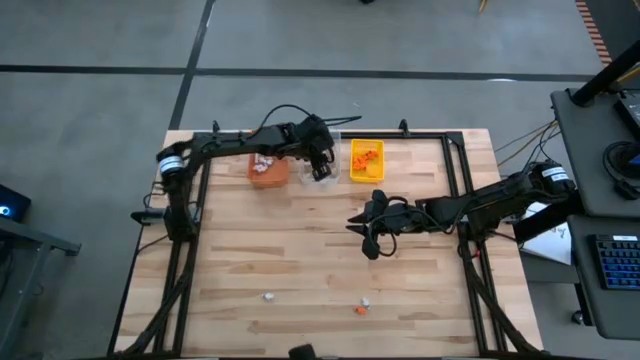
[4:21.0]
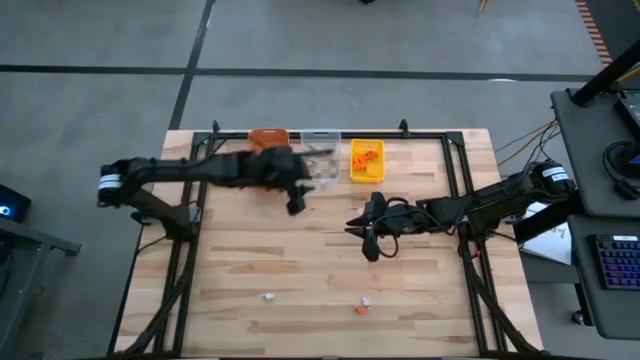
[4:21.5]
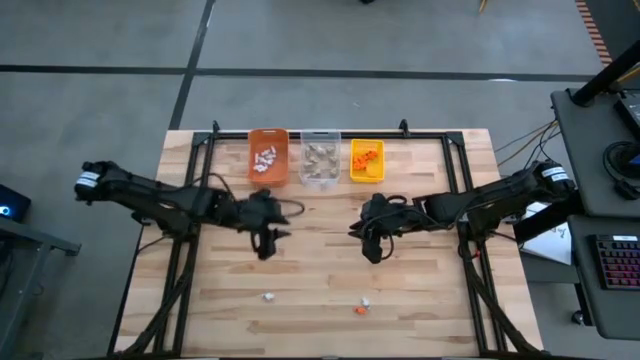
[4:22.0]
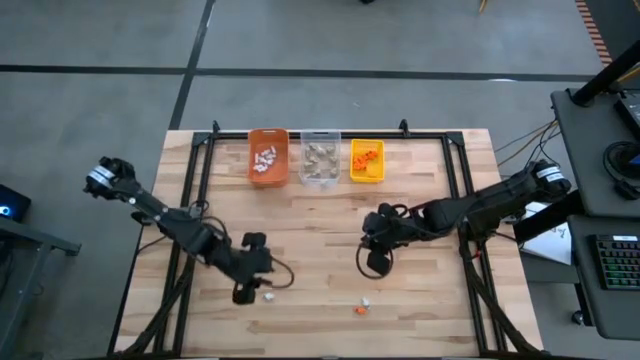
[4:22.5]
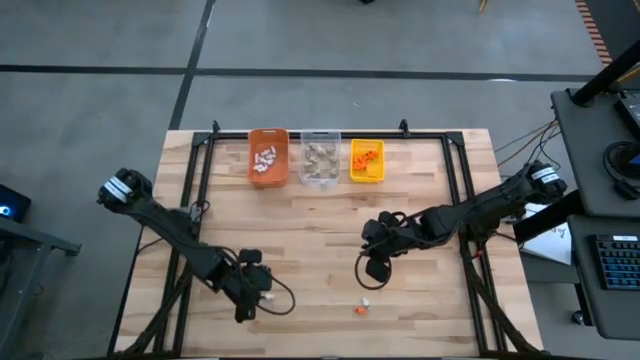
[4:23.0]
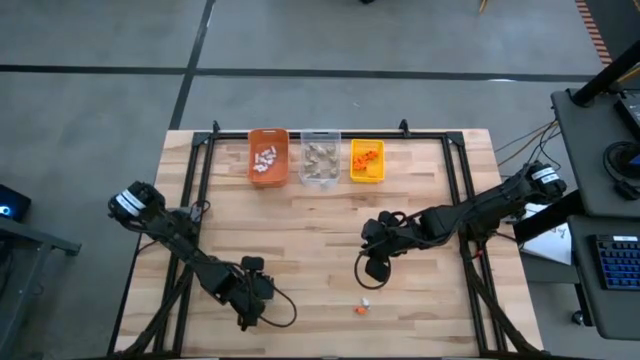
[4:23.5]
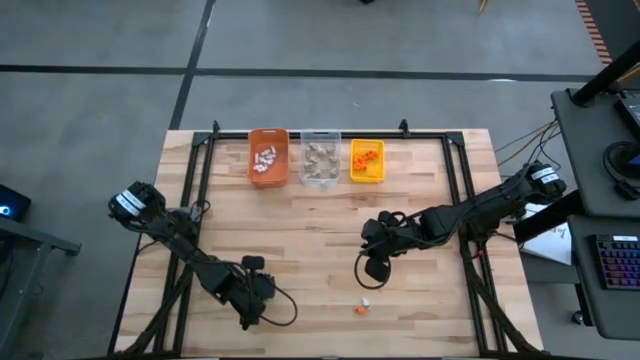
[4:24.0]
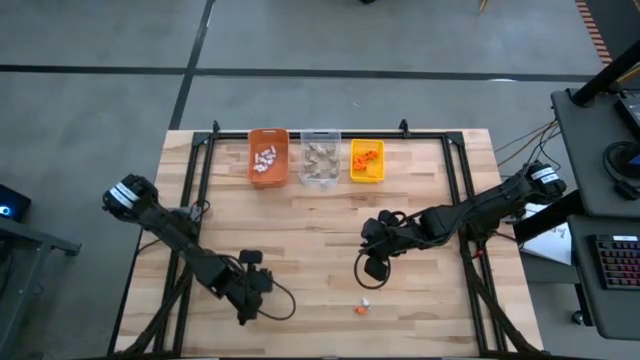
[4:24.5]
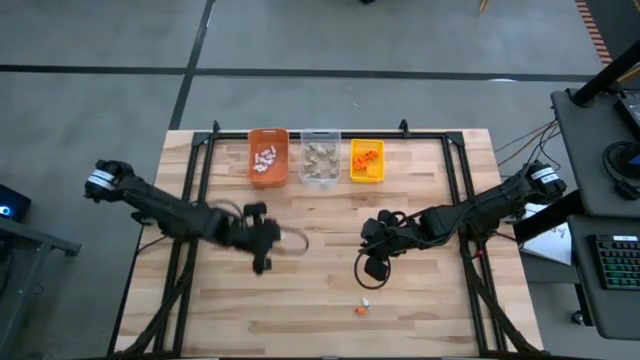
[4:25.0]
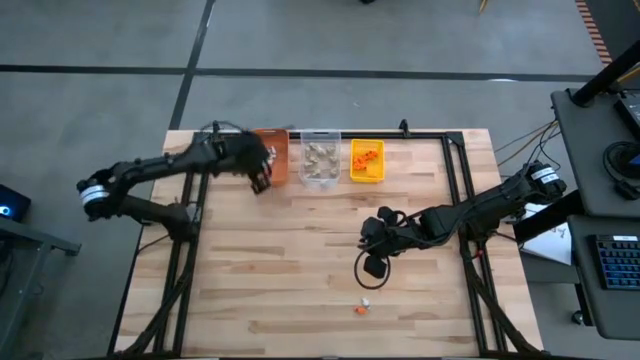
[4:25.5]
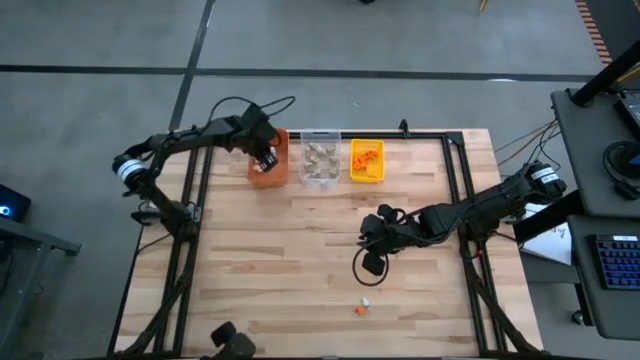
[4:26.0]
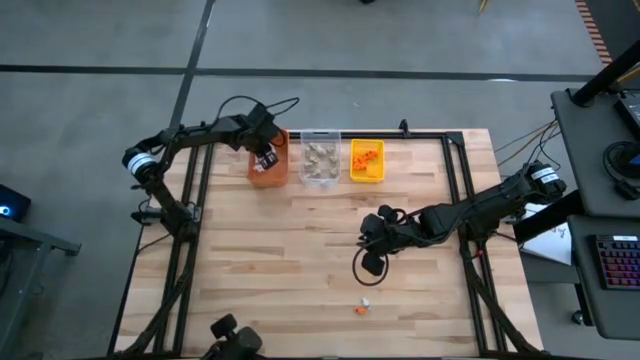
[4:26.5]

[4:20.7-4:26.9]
Task: Sort Halloween decoration
Put the white skeleton toy into the orange bin

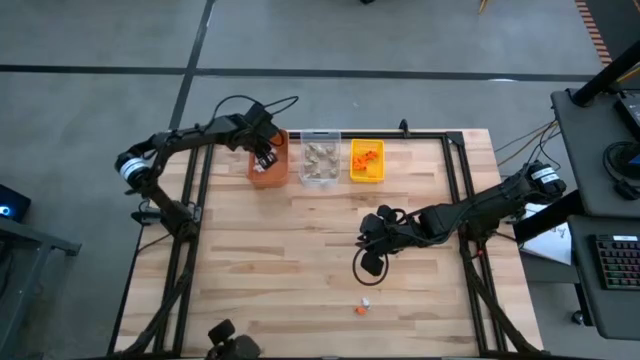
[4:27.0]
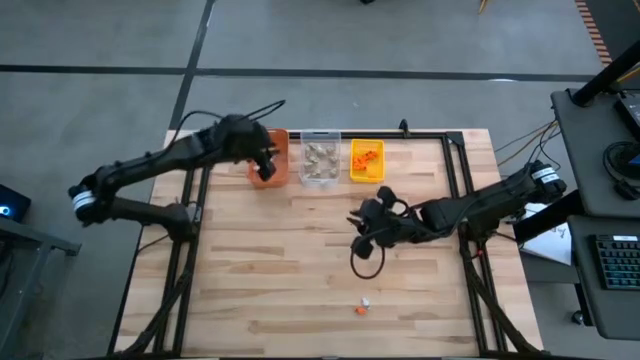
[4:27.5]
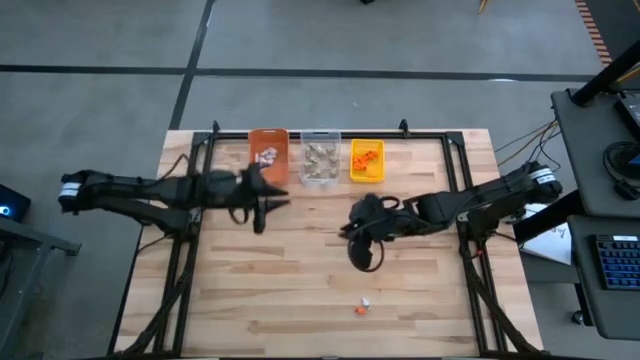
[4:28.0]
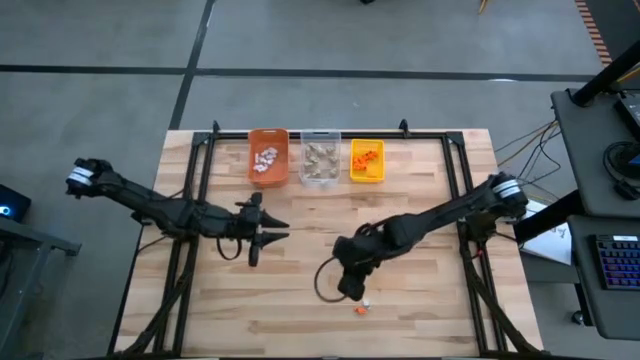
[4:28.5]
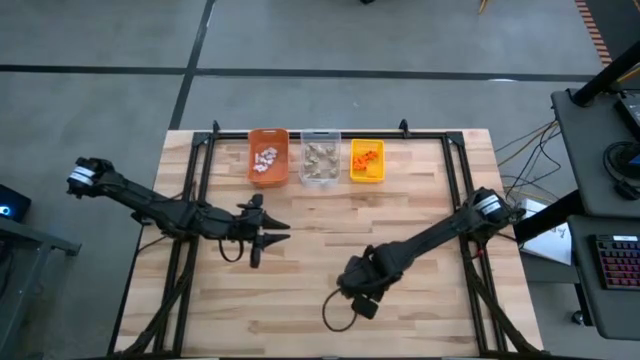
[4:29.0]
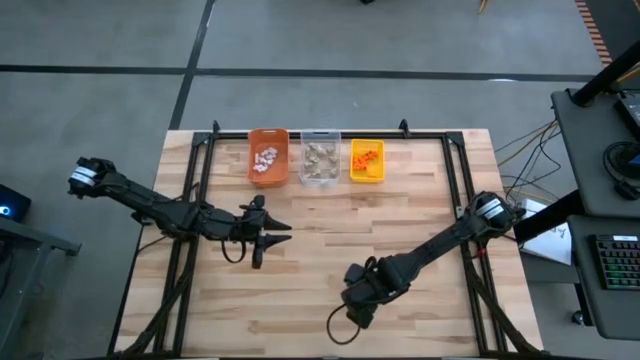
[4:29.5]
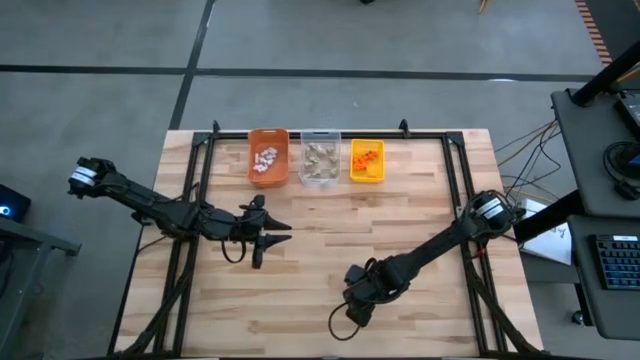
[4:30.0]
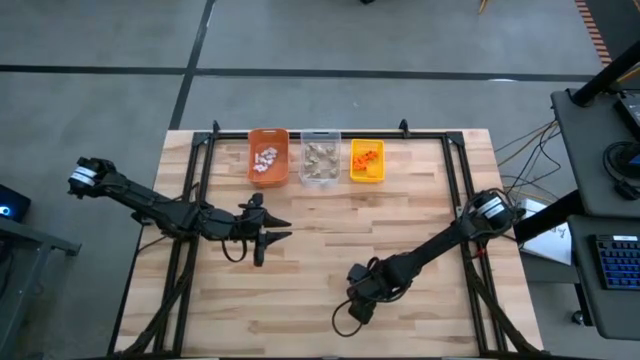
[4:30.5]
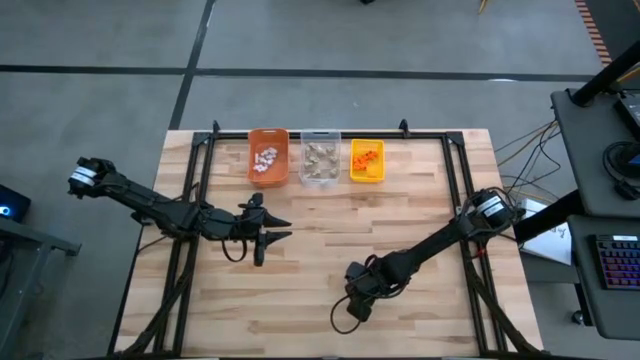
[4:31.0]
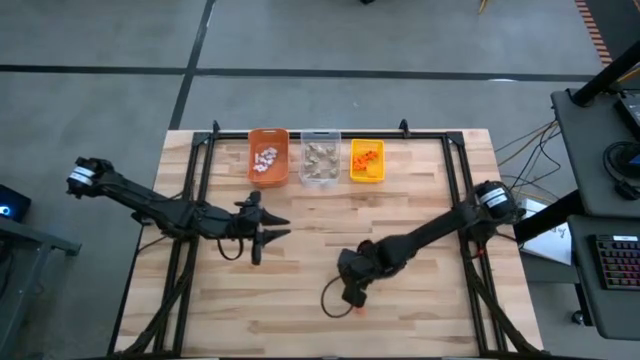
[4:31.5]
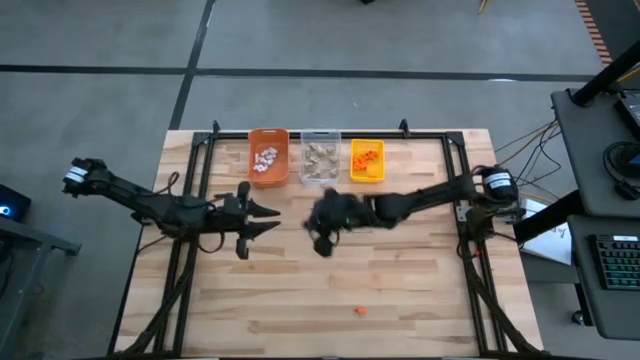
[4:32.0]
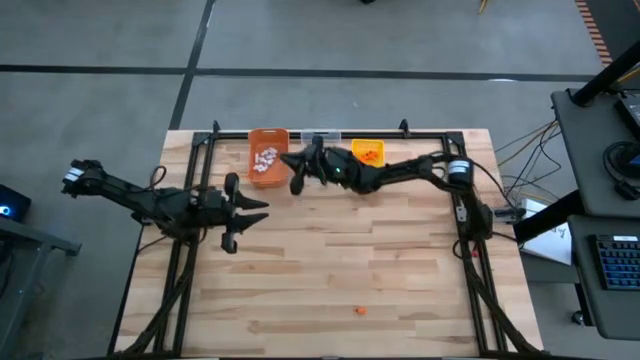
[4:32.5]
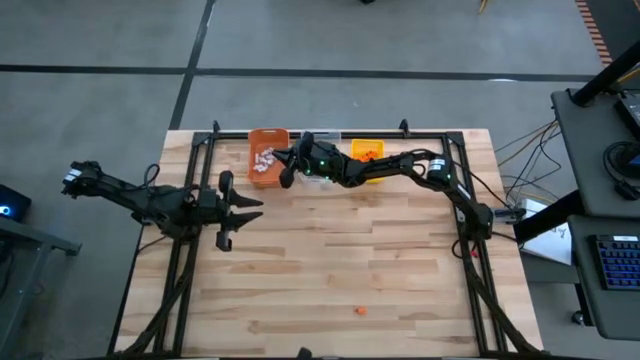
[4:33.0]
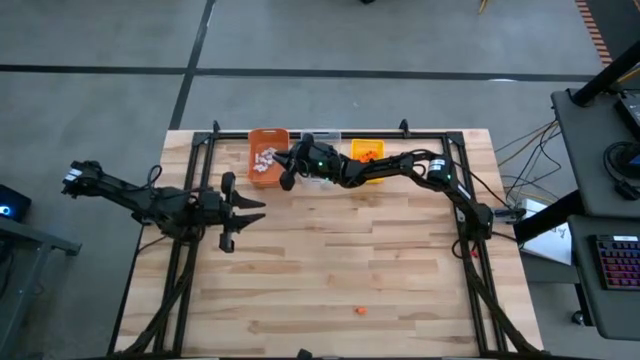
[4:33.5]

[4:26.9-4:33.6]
Put the white skeleton toy into the orange bin

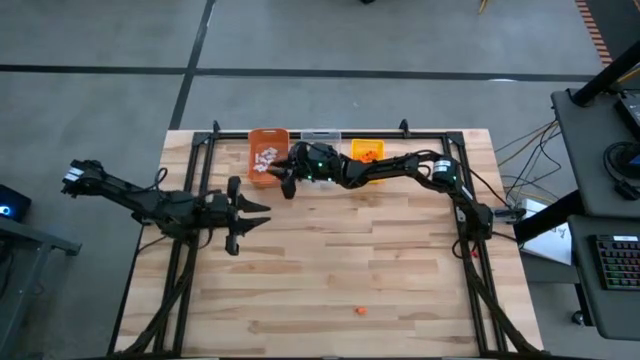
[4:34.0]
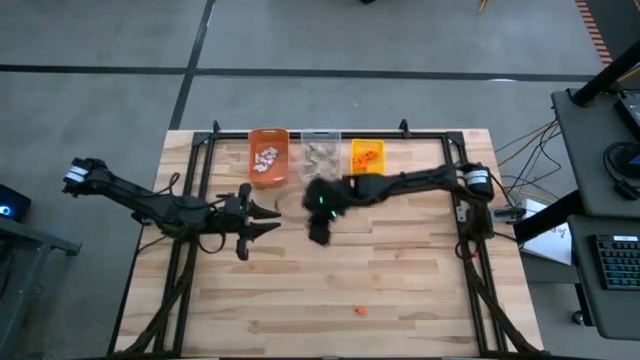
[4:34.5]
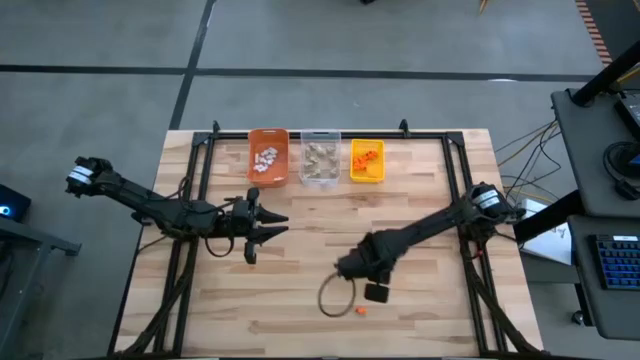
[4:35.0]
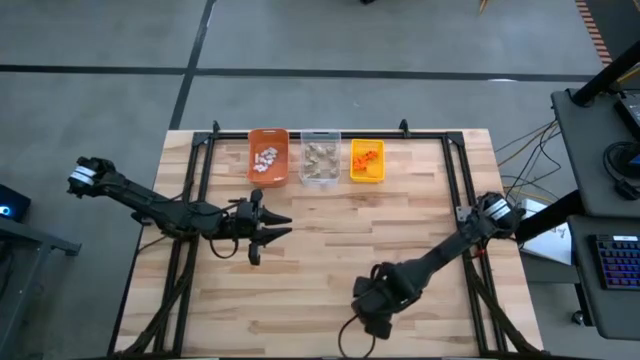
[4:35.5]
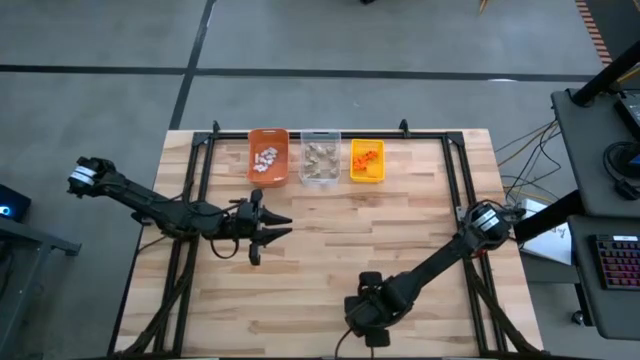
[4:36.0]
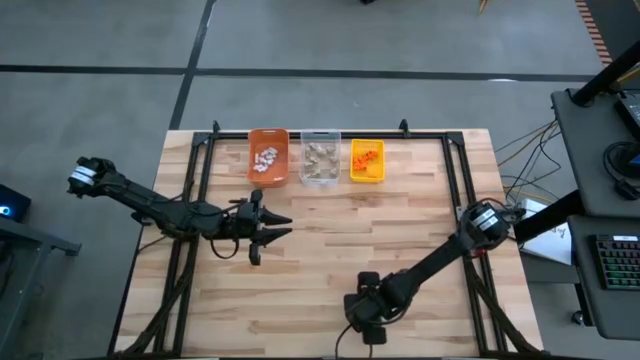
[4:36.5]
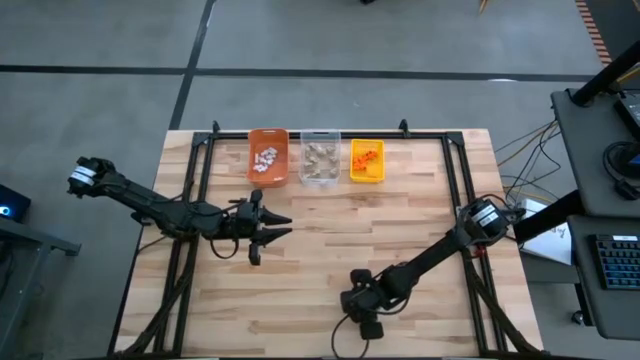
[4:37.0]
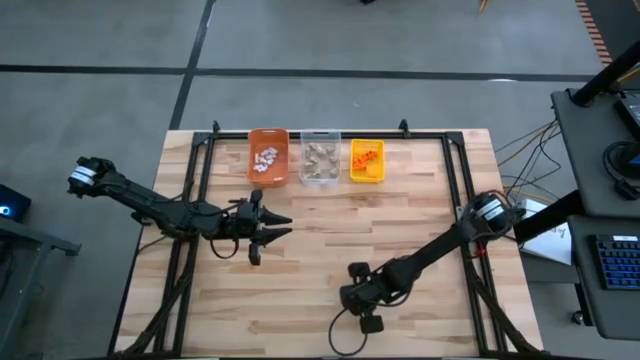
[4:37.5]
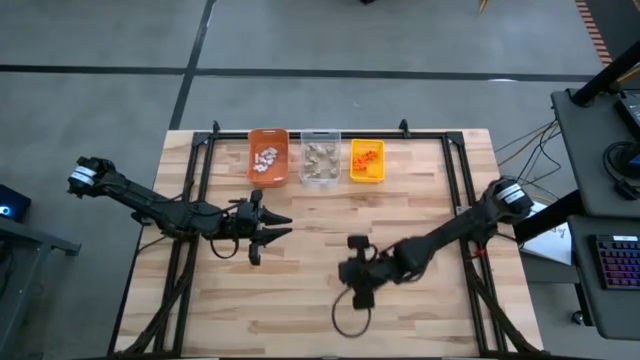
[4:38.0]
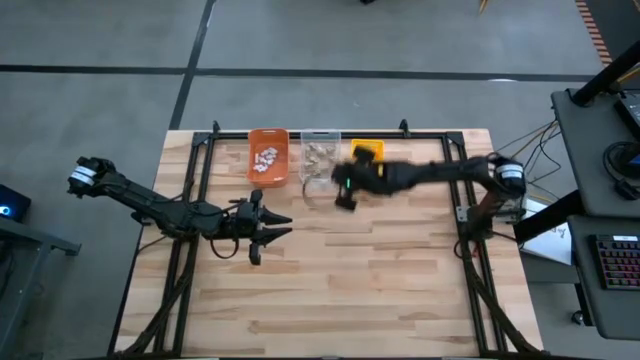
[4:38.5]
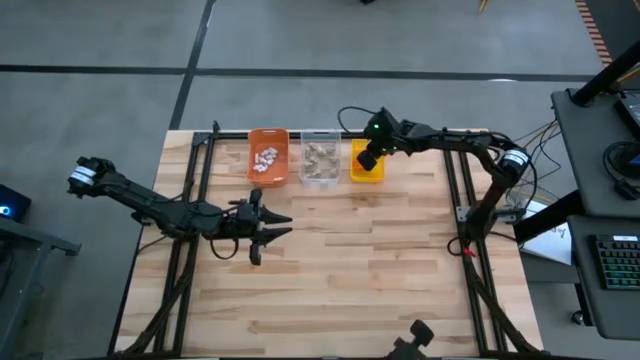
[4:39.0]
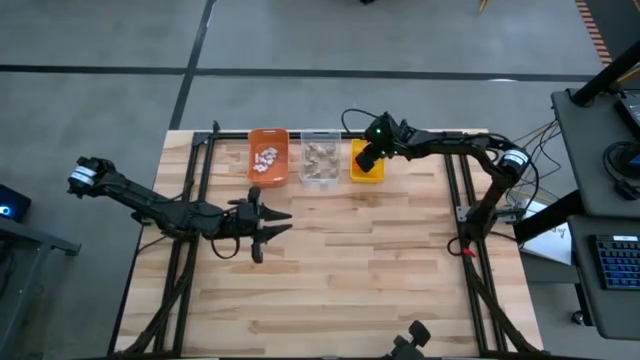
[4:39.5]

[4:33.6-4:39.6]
Put the orange skeleton toy into the yellow bin
